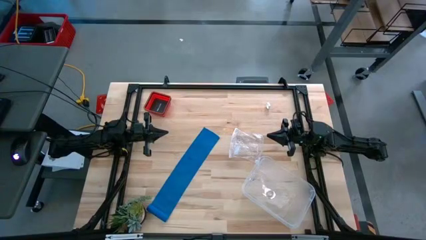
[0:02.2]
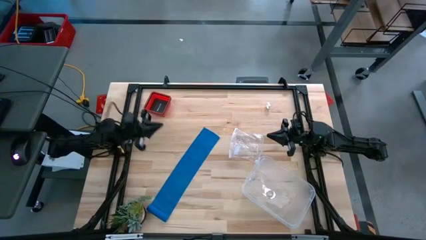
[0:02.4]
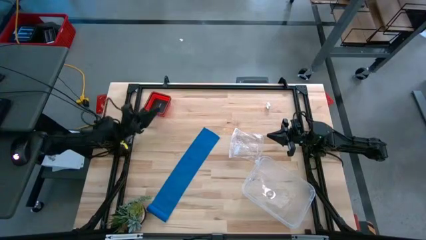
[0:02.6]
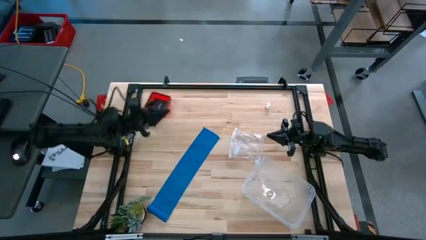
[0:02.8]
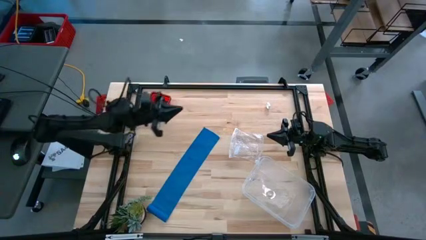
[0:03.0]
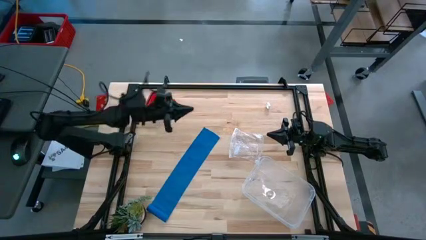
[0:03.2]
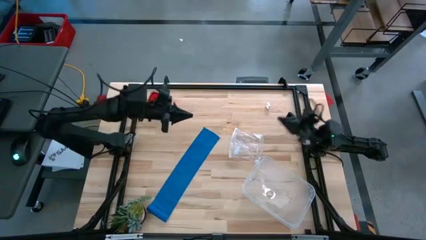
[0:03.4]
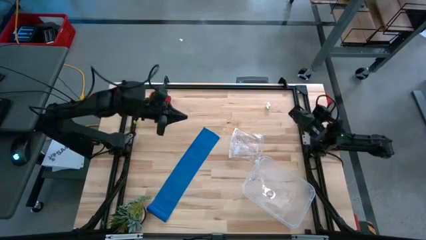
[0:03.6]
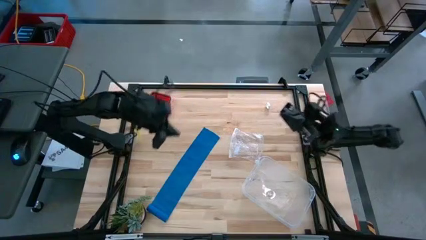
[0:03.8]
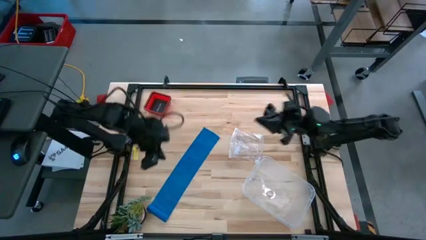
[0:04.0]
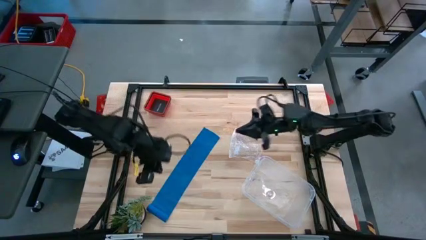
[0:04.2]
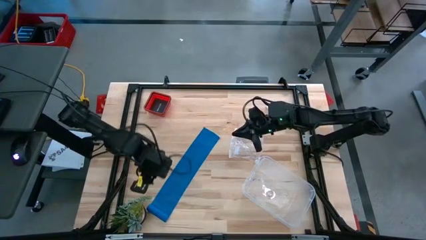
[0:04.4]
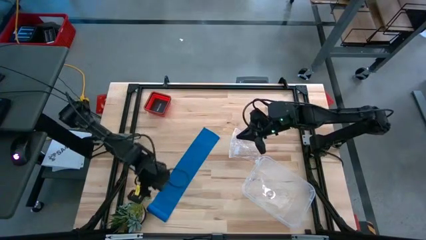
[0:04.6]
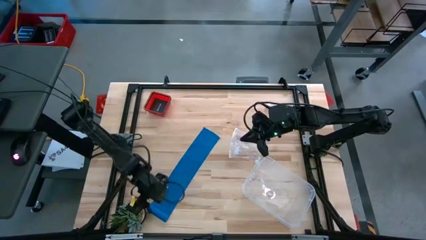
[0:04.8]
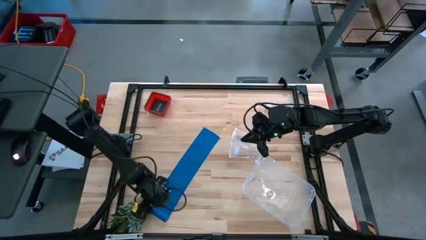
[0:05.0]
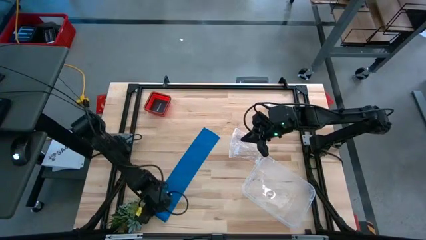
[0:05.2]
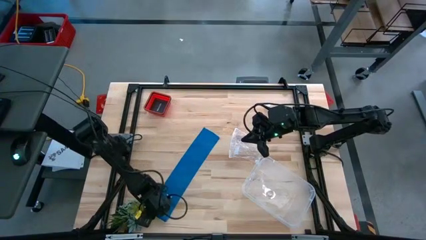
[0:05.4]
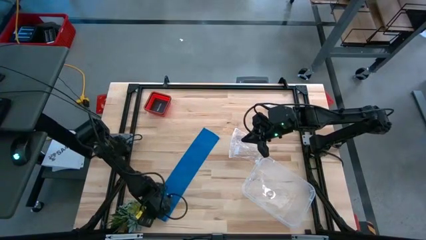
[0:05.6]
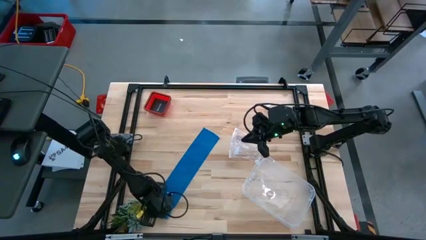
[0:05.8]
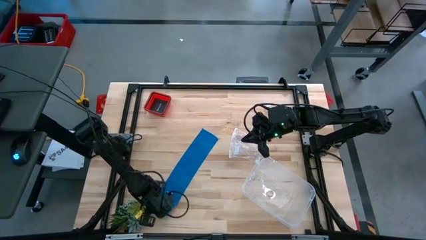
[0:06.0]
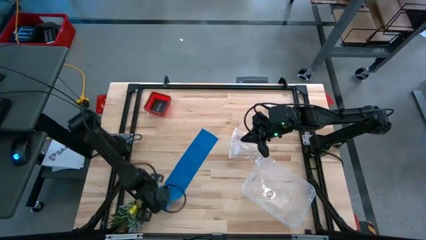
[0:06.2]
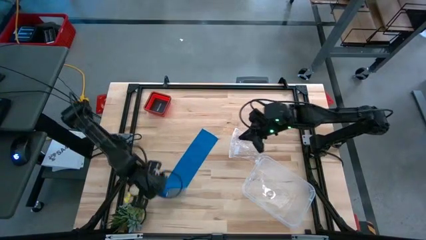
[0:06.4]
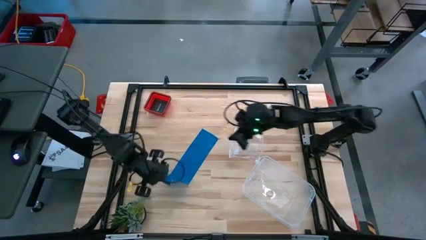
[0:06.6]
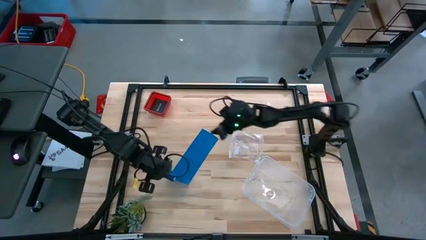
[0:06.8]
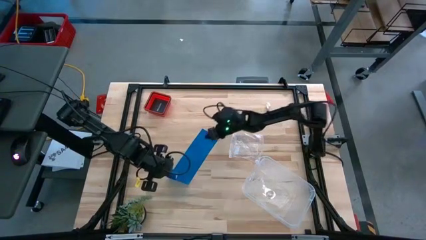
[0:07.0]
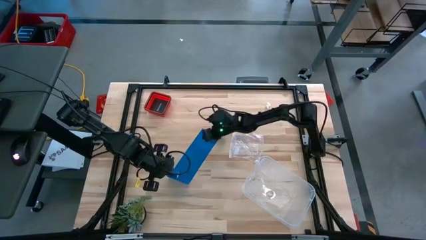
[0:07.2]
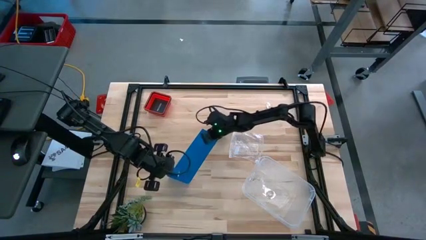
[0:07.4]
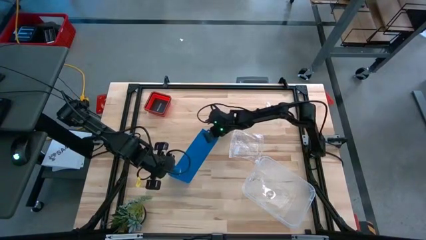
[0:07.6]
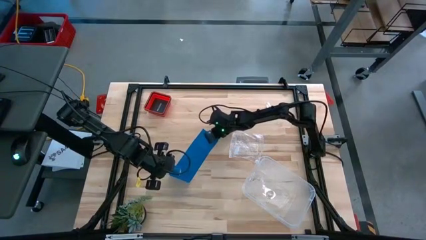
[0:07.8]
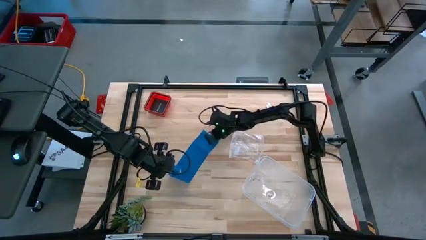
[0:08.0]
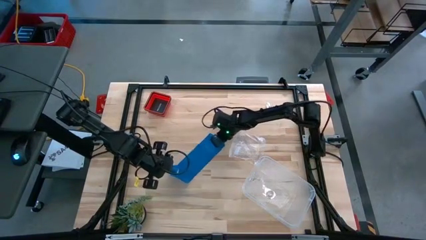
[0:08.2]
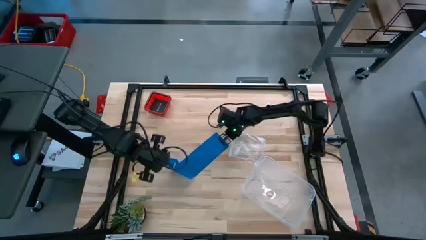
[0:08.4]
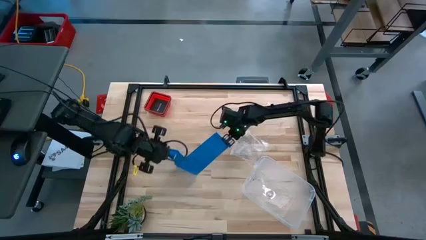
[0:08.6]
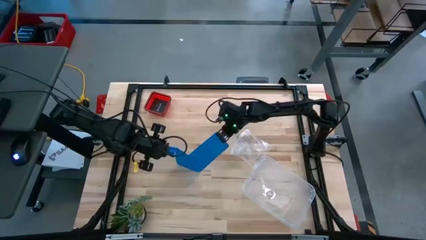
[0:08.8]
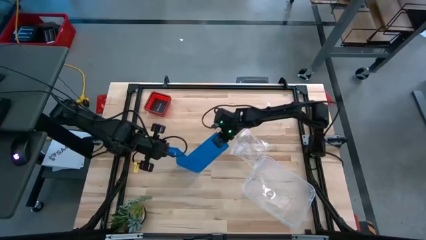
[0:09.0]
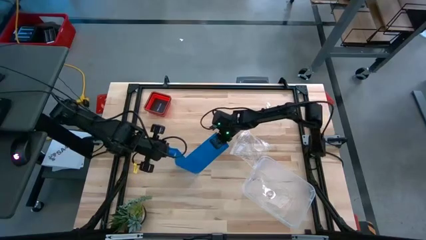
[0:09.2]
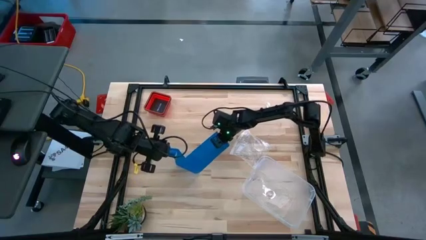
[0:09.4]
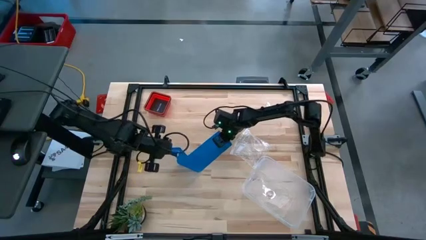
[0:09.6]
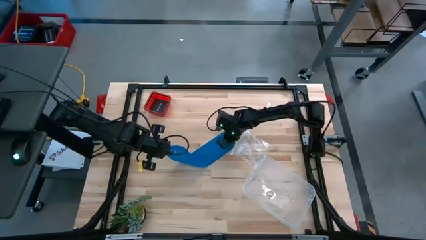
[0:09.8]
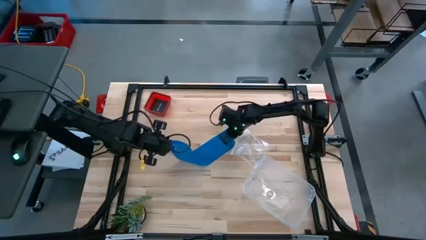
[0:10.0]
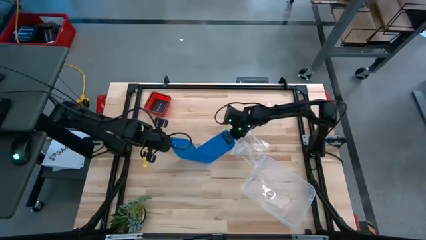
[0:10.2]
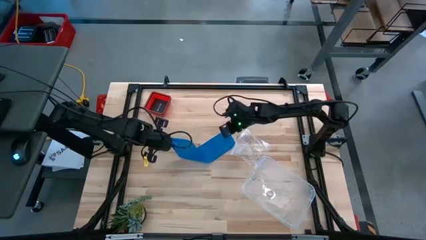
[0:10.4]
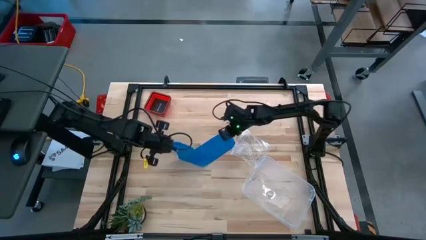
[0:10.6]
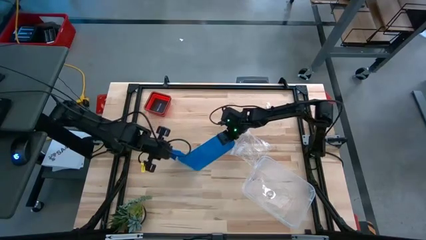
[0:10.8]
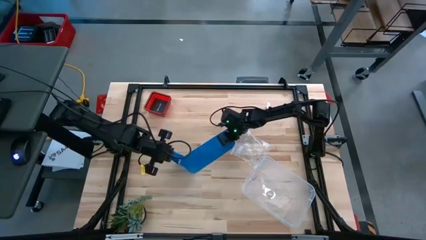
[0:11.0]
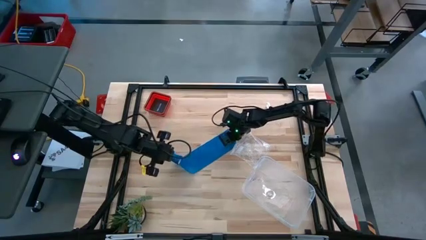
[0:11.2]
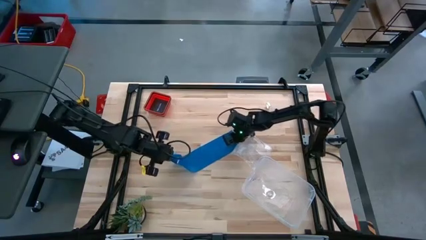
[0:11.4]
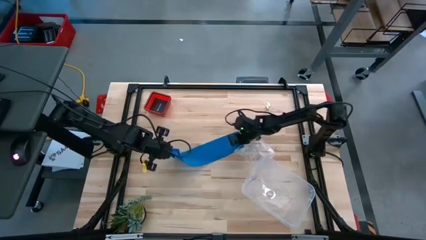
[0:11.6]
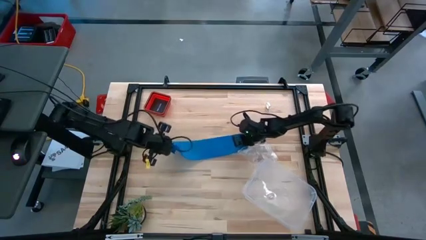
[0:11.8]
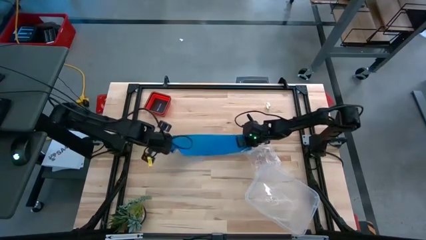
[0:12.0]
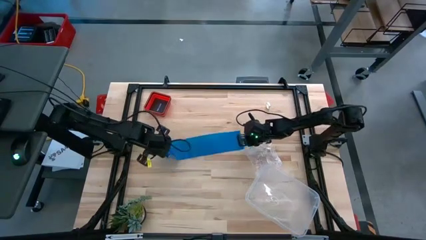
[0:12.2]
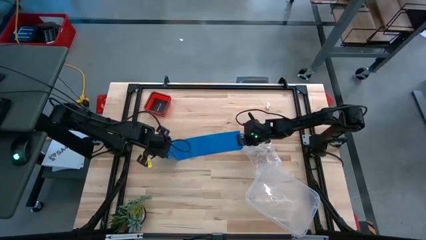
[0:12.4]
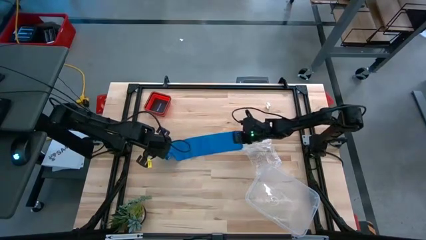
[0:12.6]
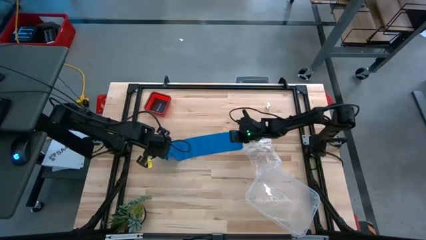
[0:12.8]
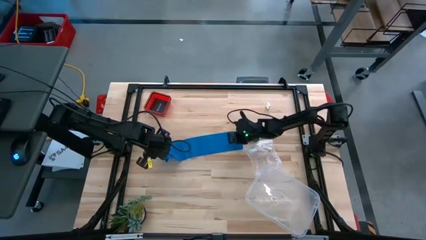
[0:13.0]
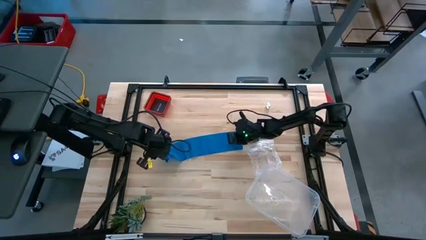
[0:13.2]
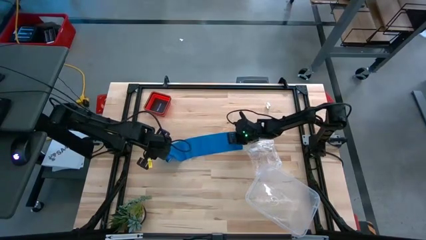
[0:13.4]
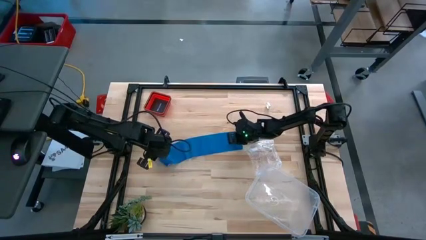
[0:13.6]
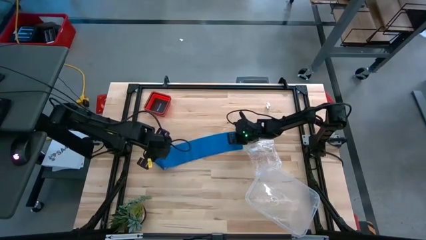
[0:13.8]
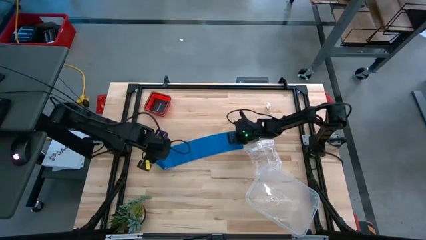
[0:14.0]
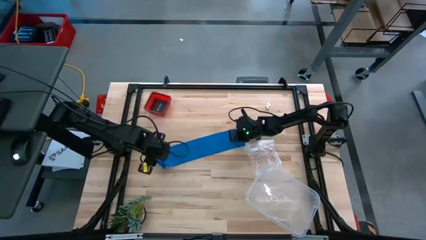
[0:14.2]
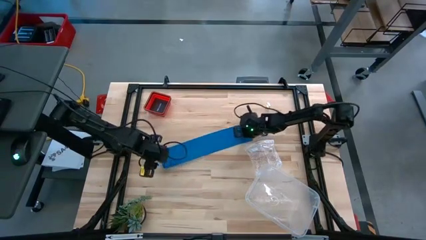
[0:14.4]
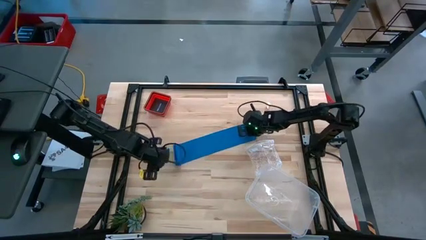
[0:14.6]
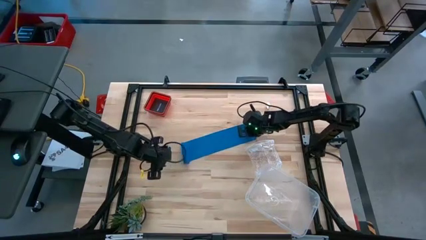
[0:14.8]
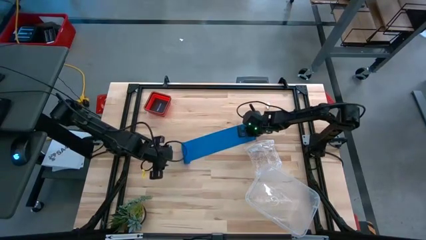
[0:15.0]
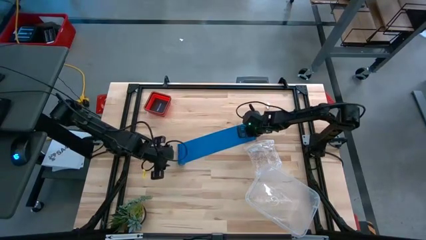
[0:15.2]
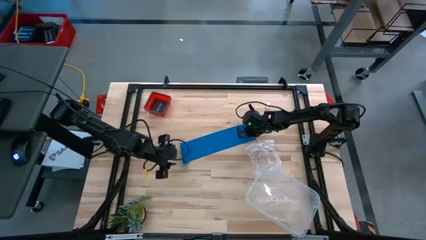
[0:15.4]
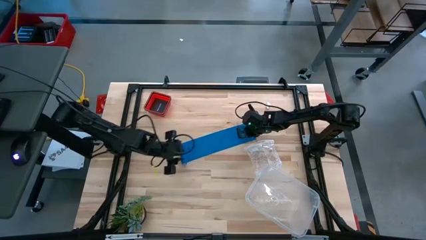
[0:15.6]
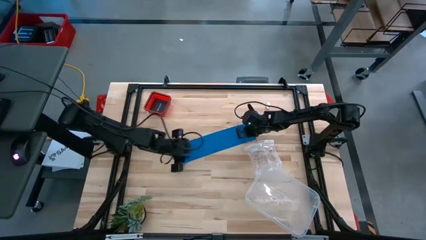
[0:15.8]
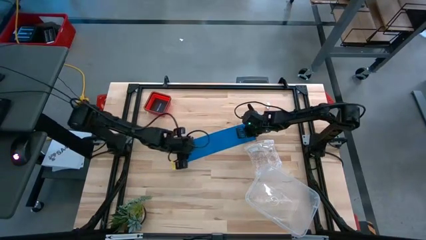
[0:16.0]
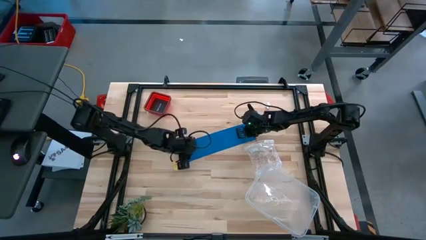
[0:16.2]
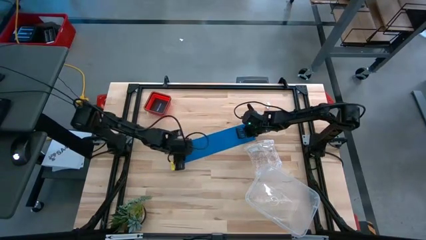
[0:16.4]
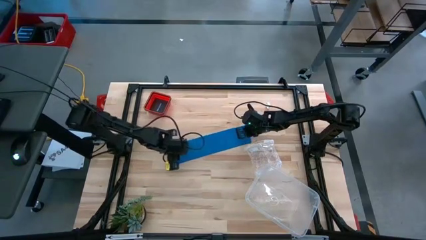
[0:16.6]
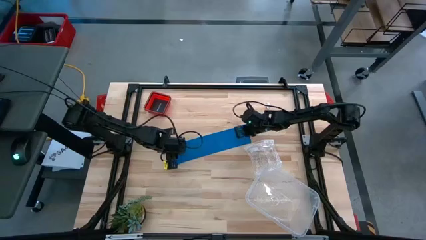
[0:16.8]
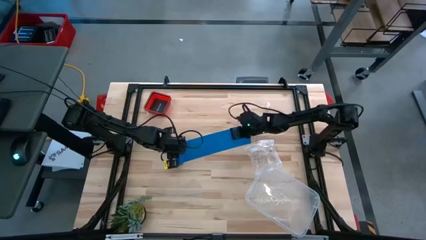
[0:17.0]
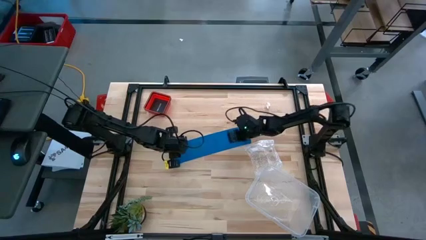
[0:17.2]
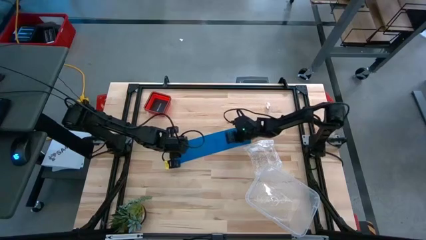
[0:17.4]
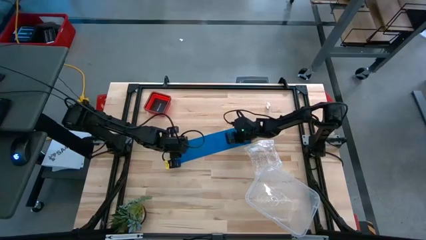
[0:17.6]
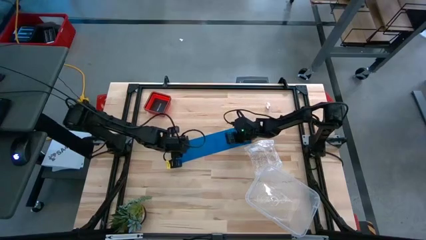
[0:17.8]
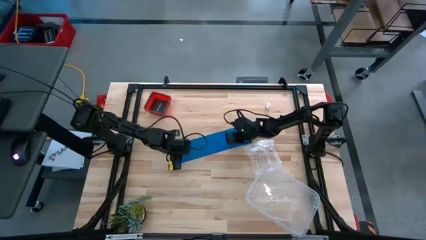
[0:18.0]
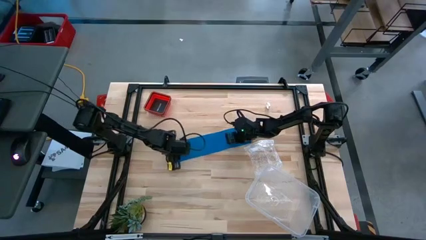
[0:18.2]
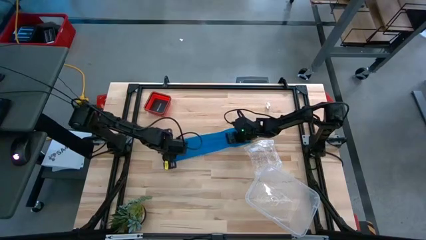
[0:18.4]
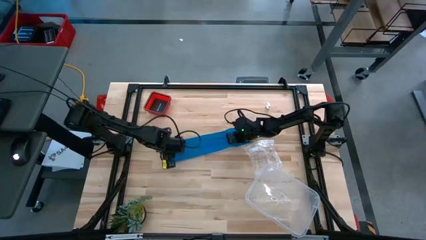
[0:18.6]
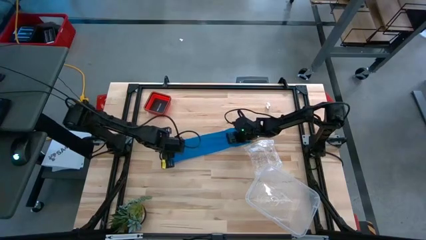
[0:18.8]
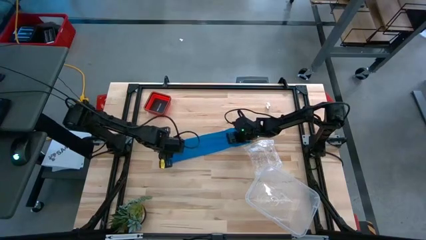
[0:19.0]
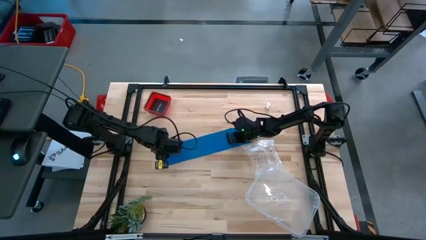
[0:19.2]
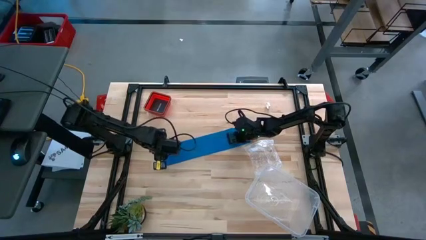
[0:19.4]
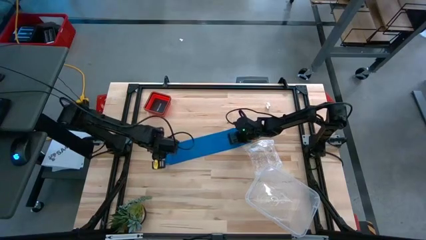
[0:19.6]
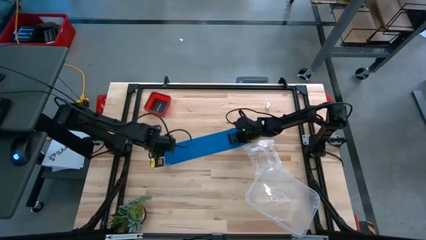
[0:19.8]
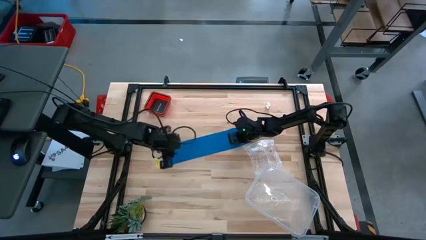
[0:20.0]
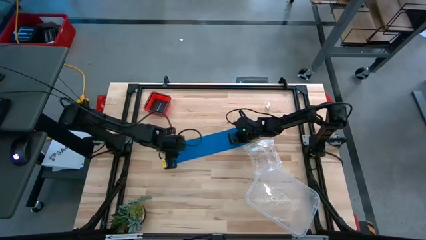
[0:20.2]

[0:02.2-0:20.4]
Task: Roll bandage
Roll the blue bandage
